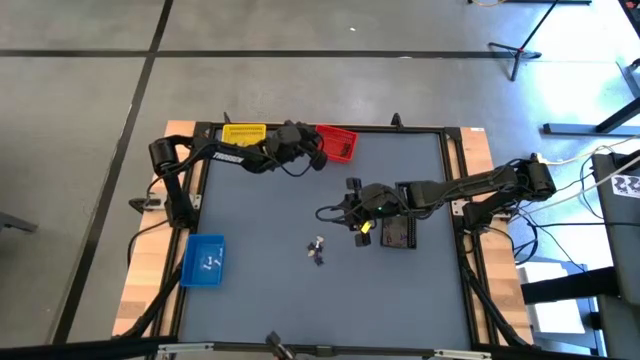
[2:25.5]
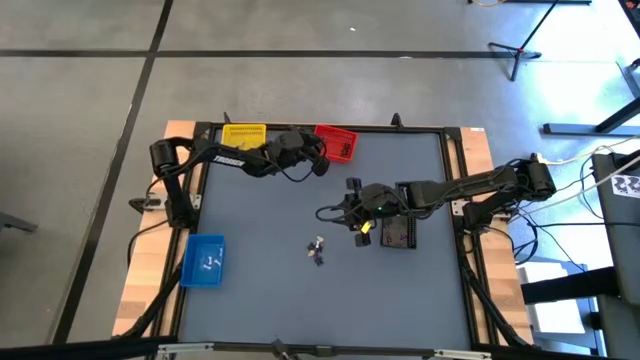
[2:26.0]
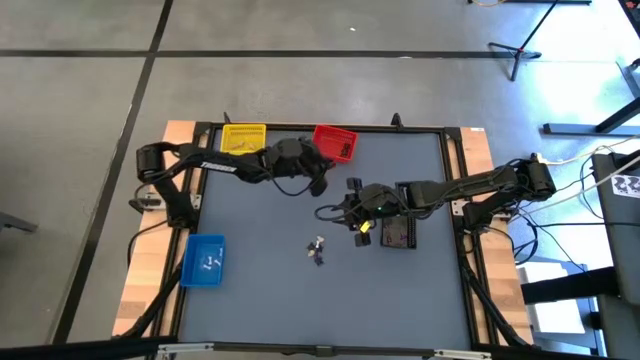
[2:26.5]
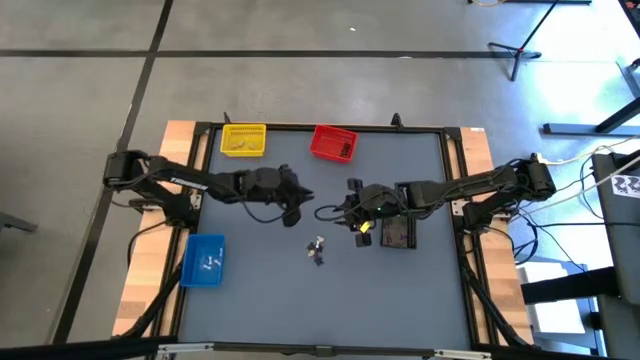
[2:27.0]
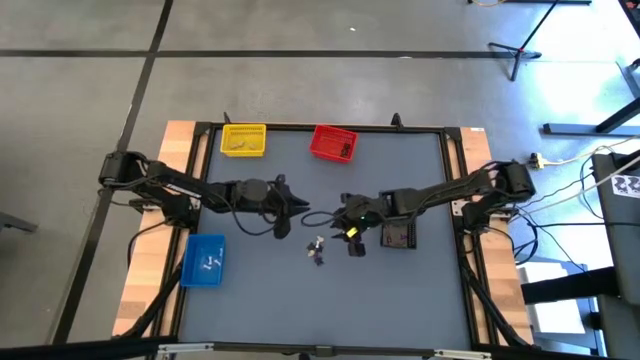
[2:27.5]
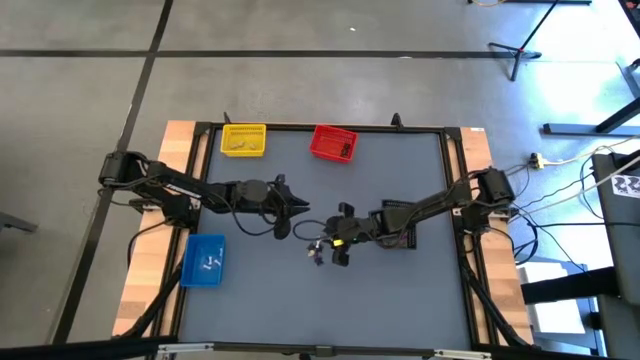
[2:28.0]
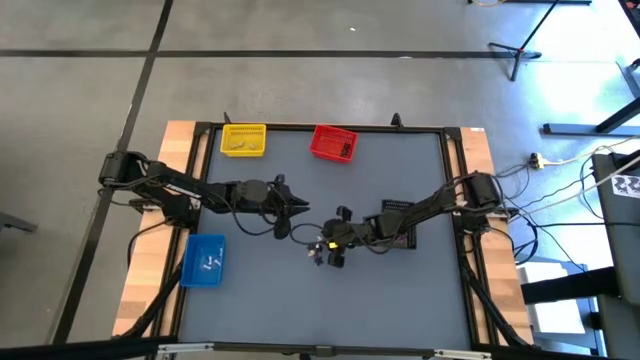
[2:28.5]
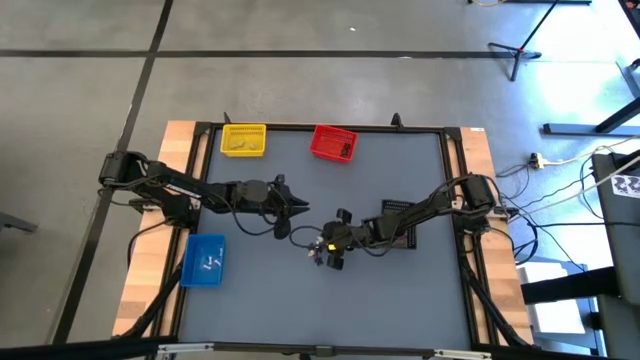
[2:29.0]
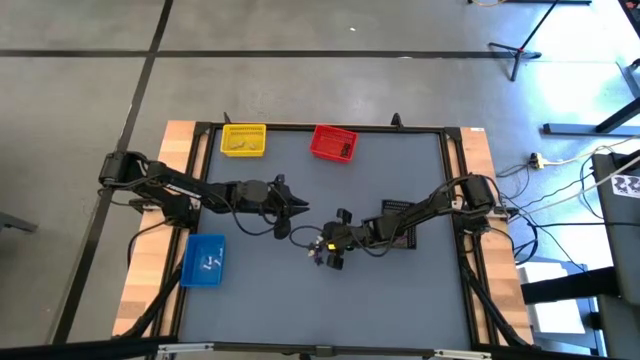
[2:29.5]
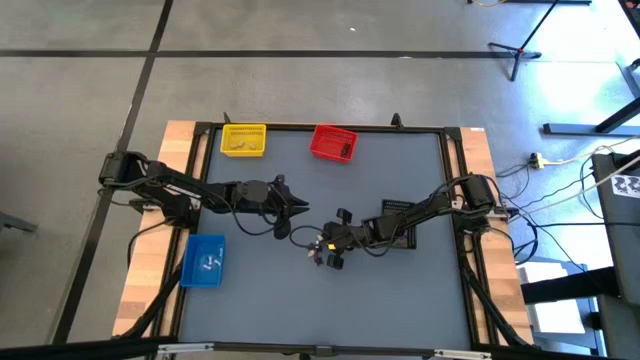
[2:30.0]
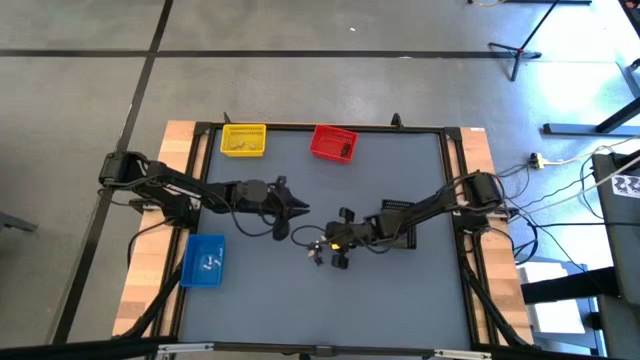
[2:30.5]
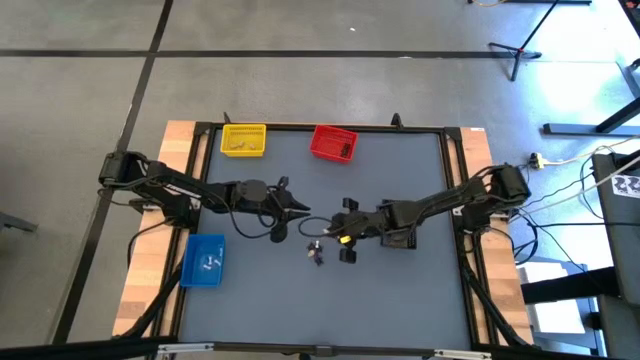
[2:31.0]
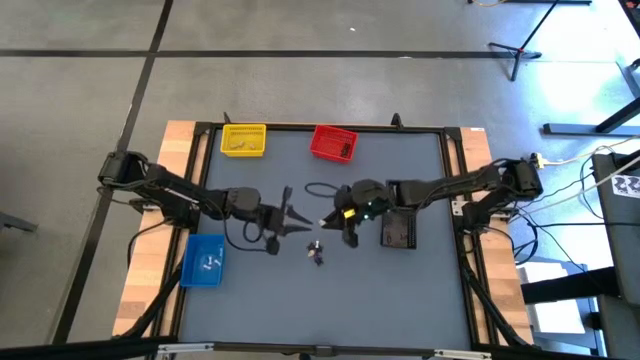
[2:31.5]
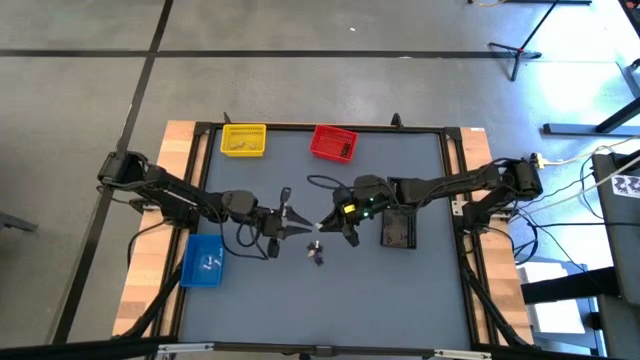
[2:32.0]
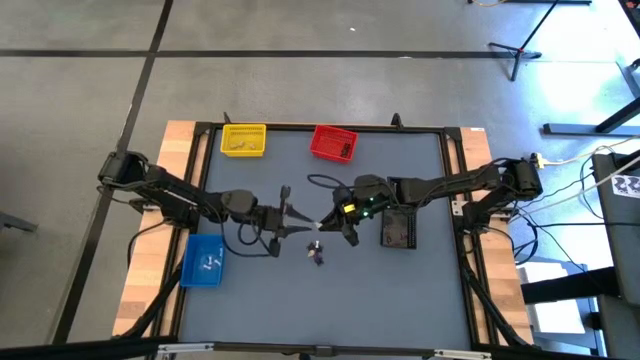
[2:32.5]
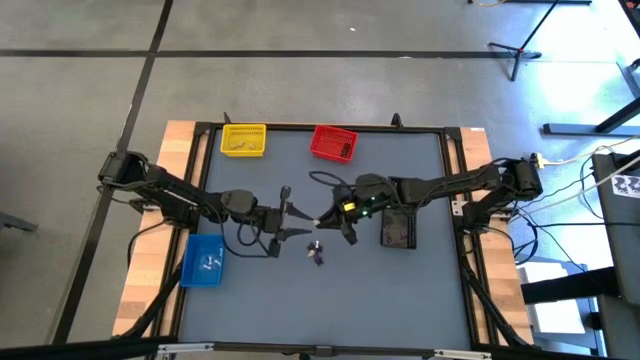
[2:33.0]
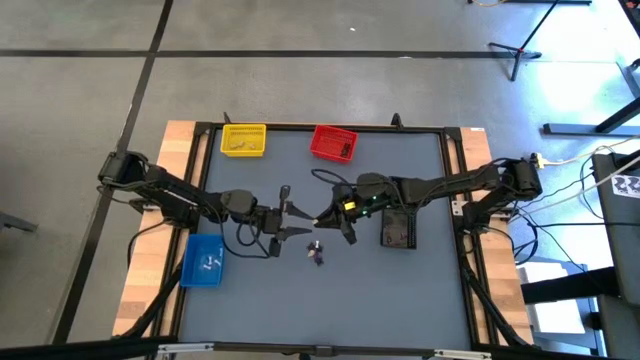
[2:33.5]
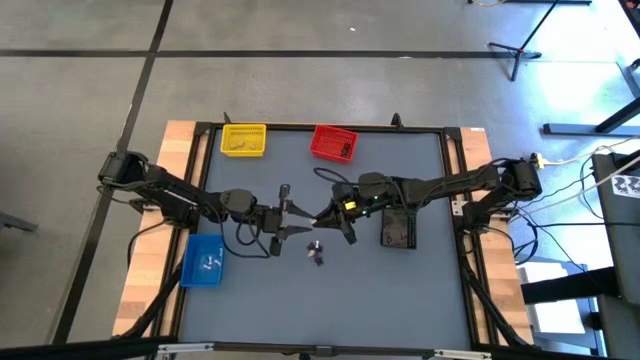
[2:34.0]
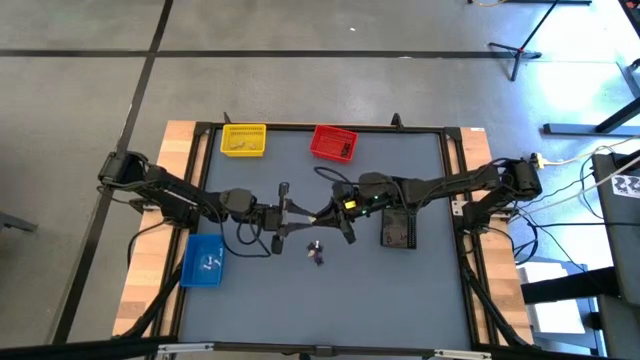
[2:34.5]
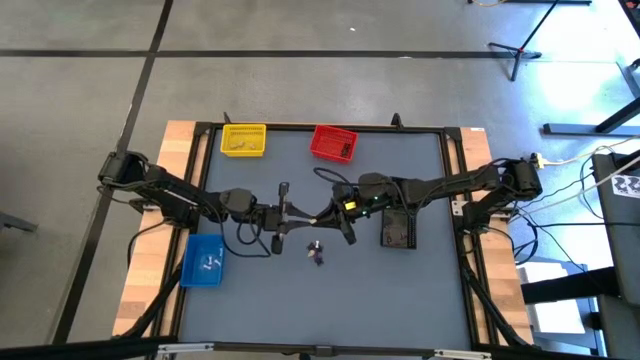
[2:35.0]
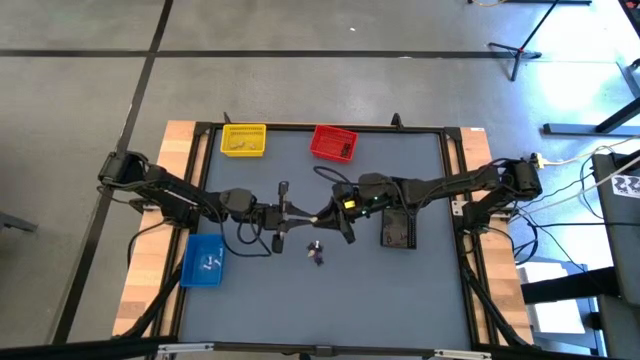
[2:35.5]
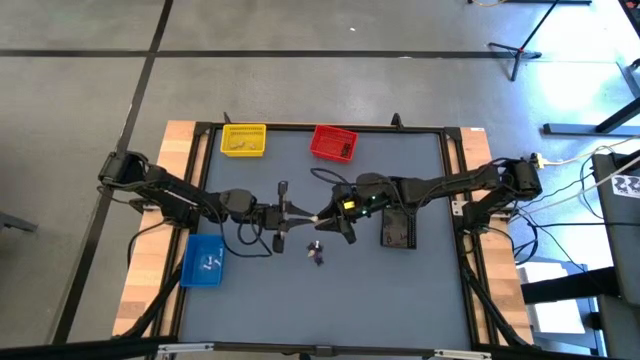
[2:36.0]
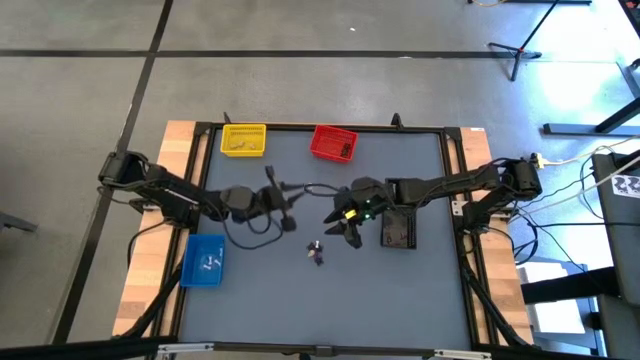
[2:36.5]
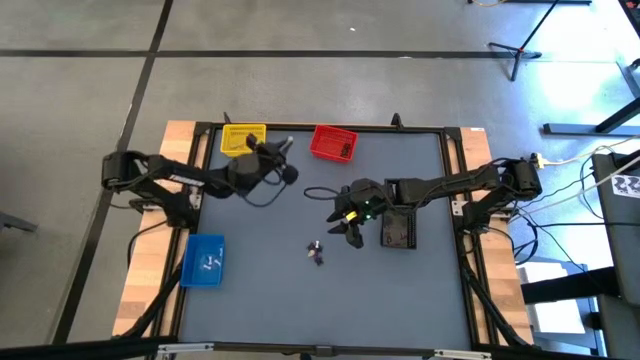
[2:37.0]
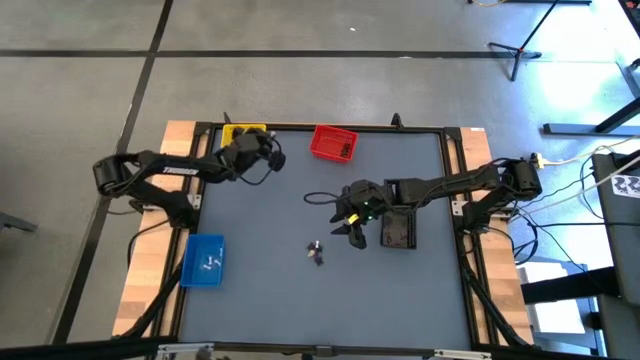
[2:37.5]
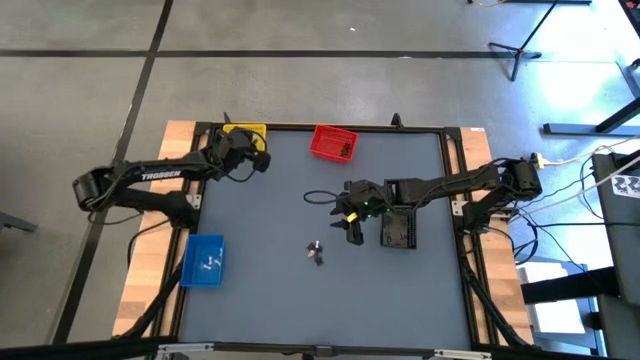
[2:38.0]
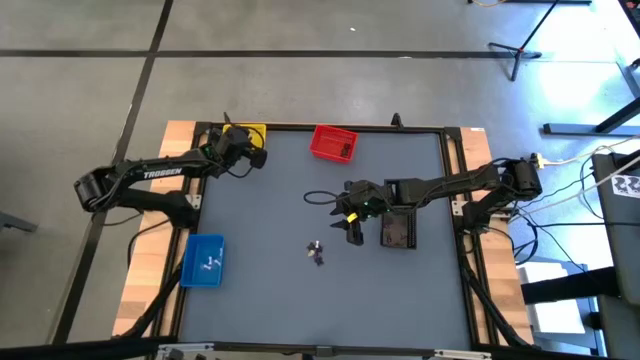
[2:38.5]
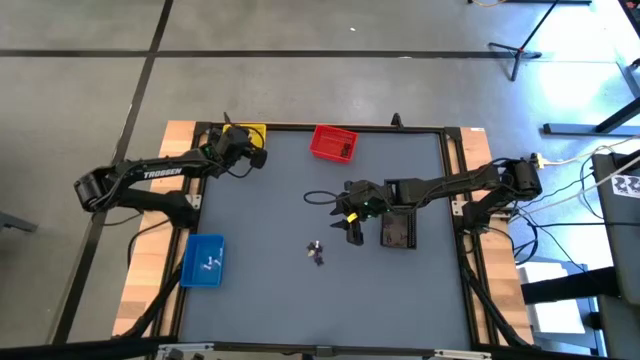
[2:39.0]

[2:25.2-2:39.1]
Task: Sort Halloween decoration
Put the yellow skull toy into the yellow bin

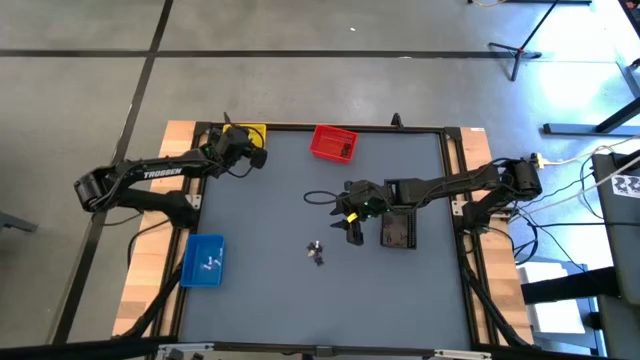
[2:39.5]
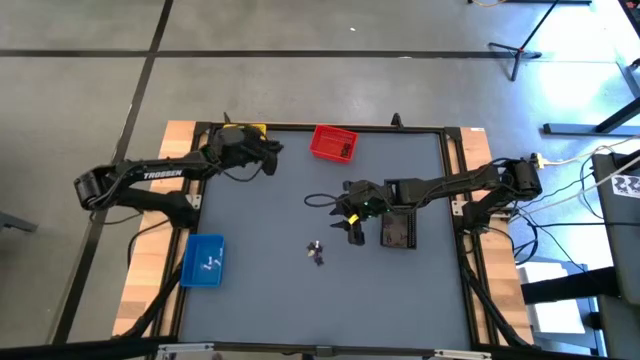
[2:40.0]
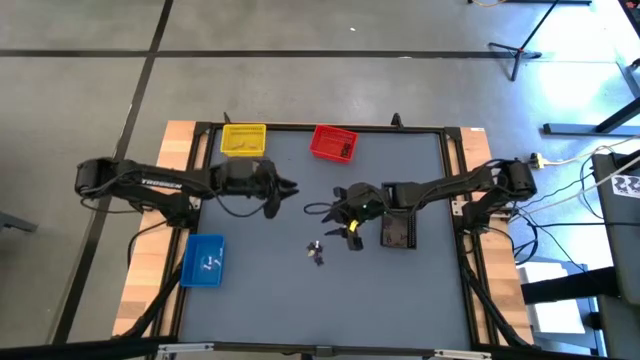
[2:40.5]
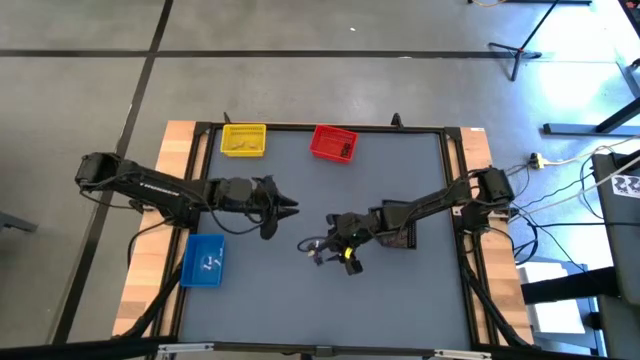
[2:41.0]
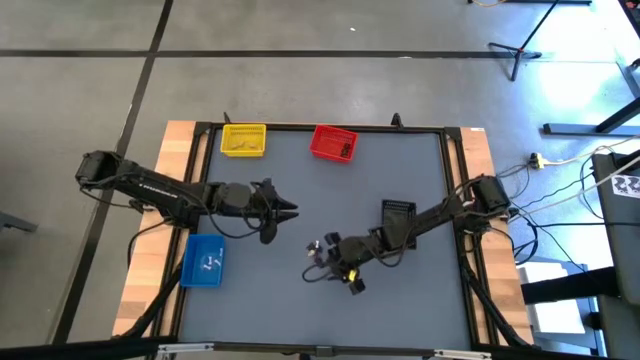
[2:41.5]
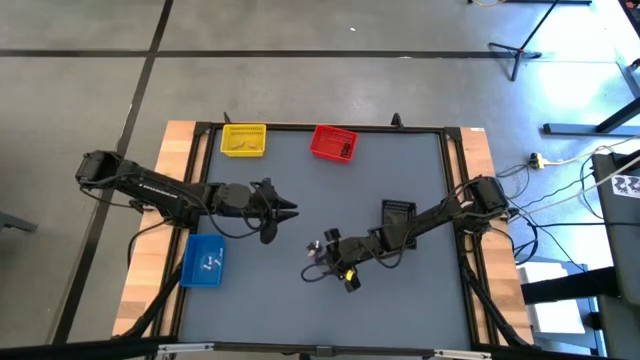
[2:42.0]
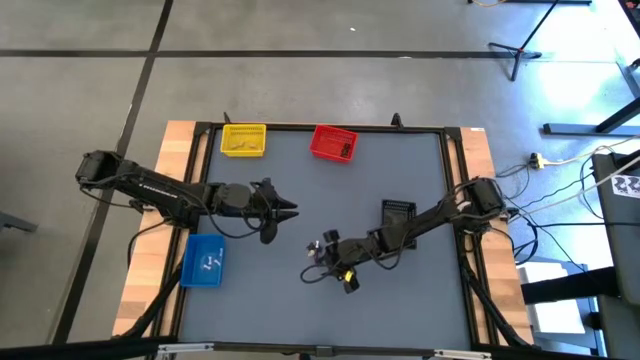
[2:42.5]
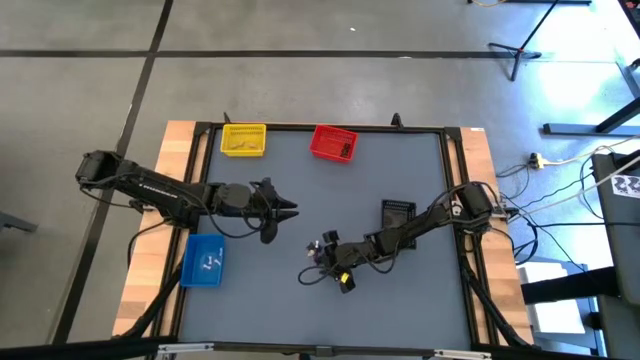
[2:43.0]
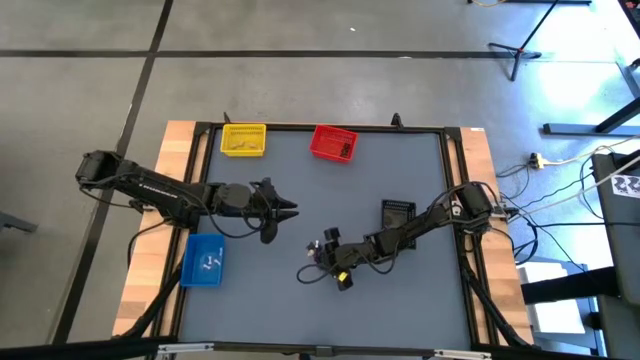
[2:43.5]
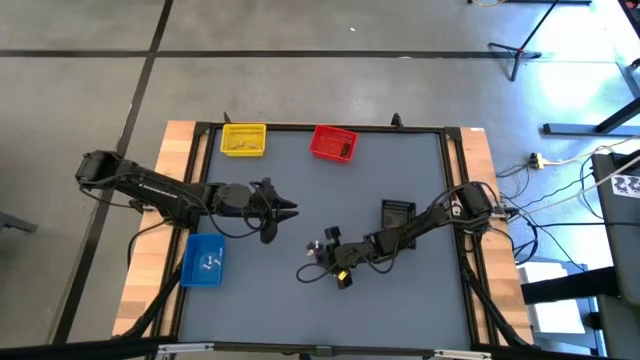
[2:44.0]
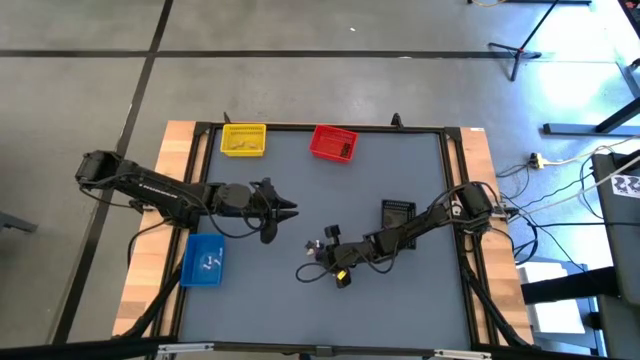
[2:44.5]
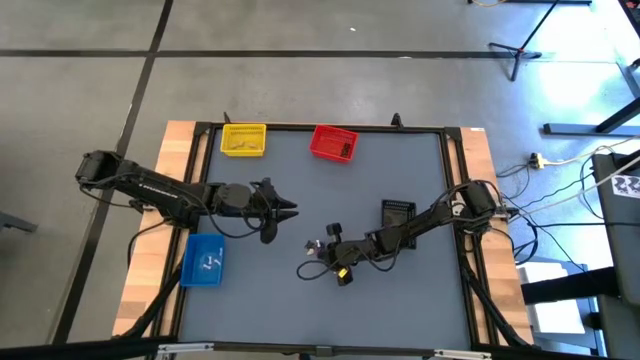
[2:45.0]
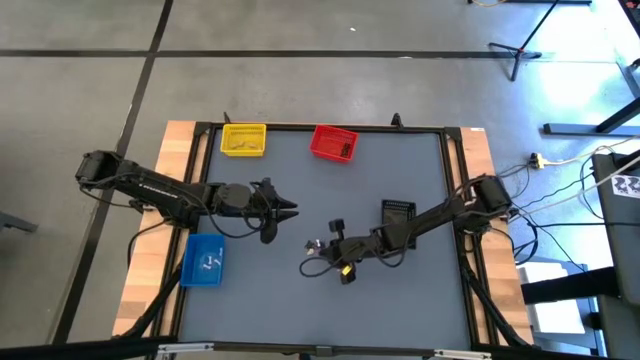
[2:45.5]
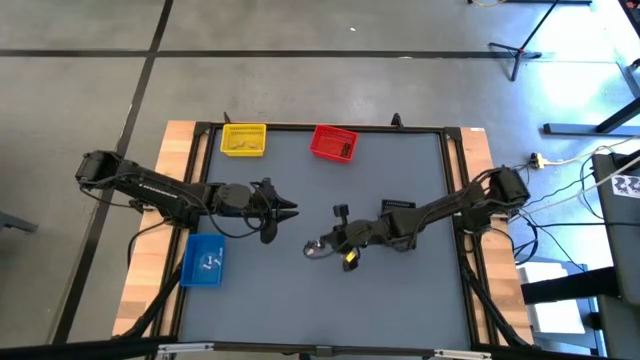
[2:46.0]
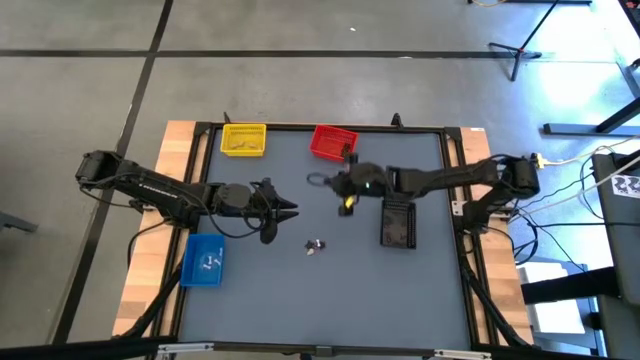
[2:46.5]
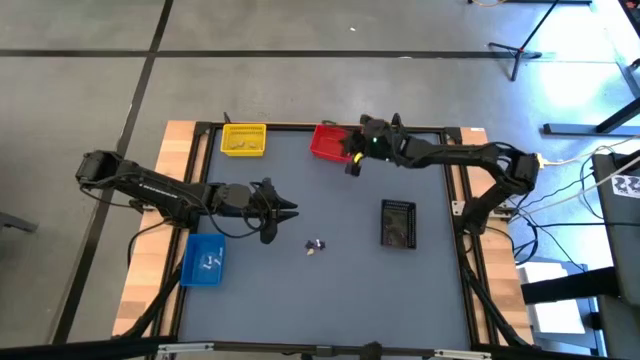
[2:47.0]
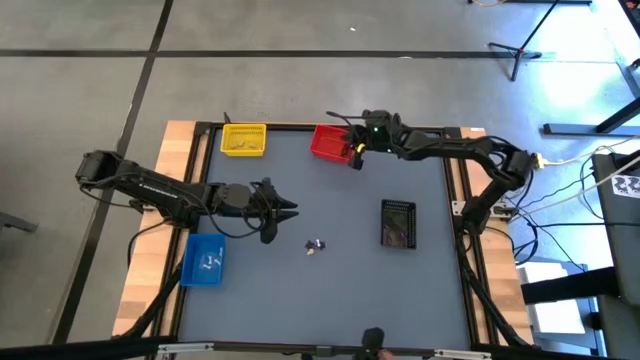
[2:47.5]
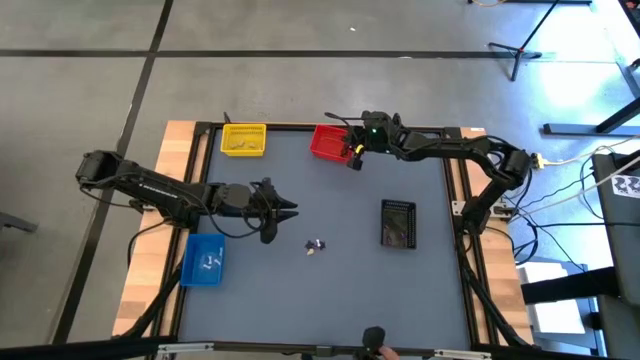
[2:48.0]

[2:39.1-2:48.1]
Put the black spider toy into the red bin
